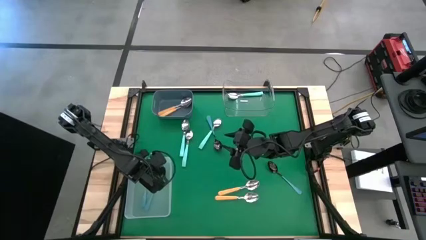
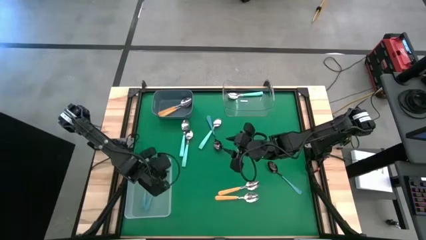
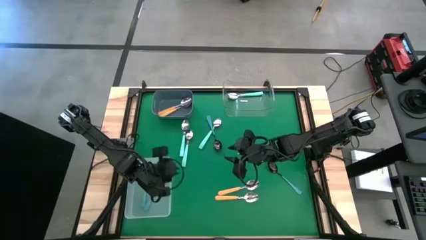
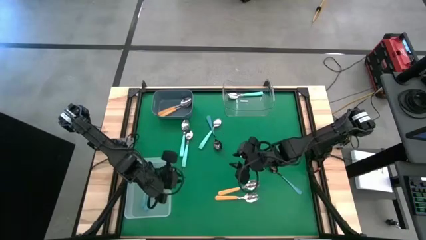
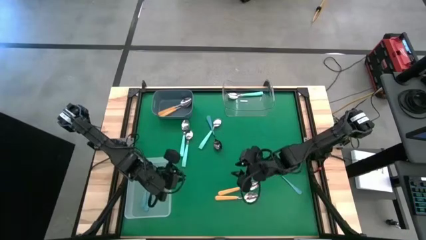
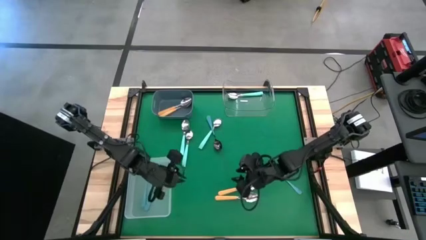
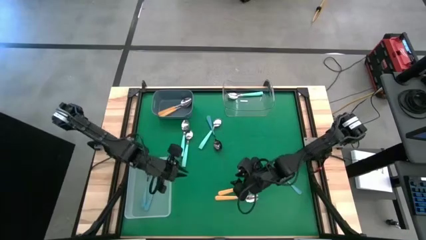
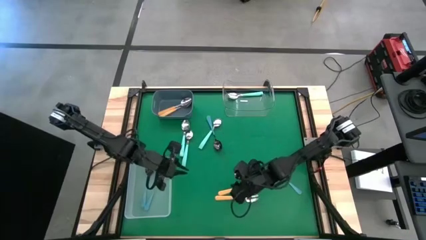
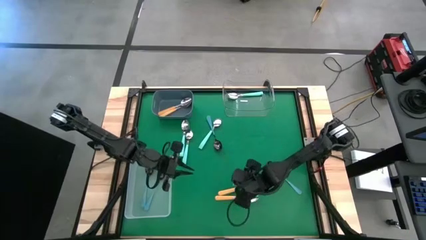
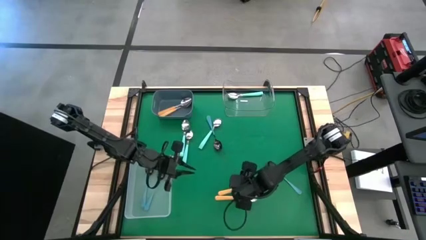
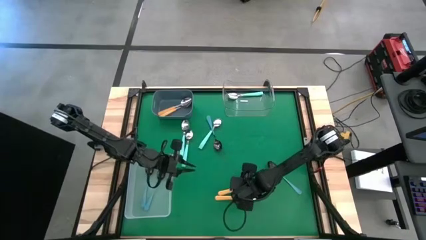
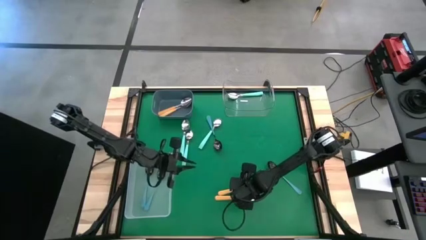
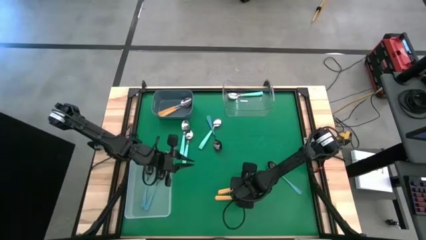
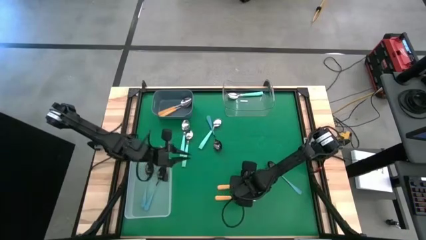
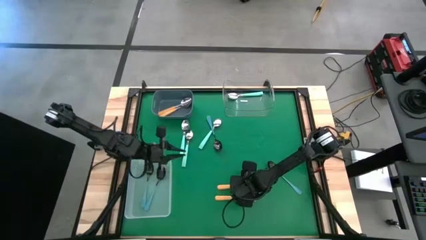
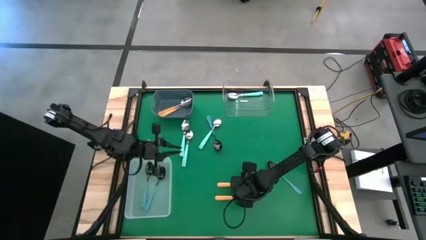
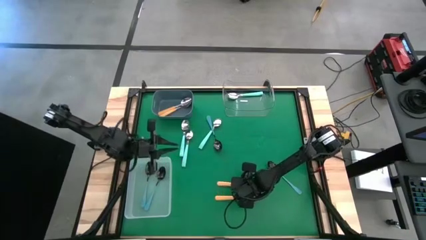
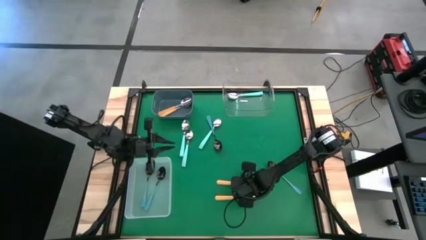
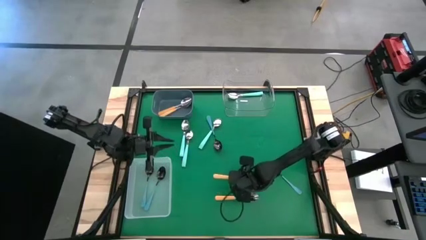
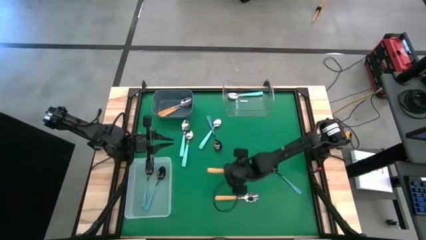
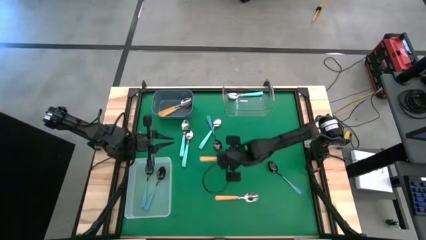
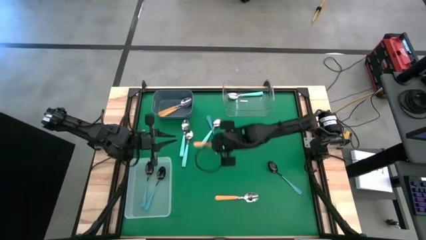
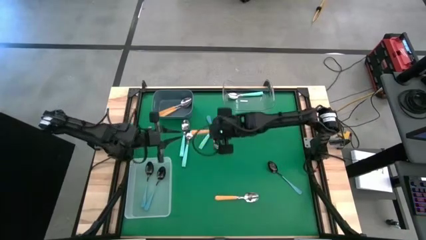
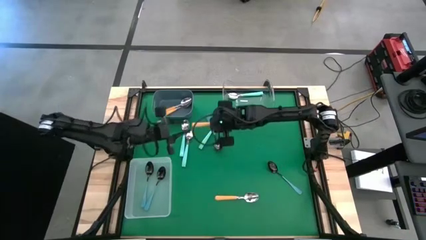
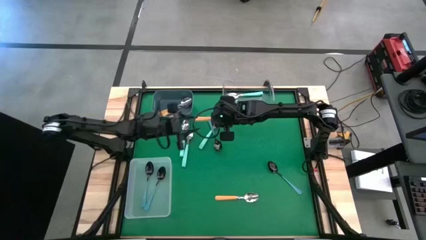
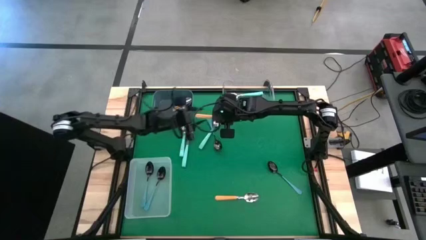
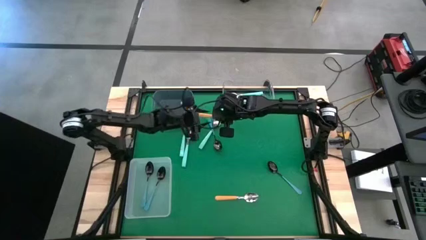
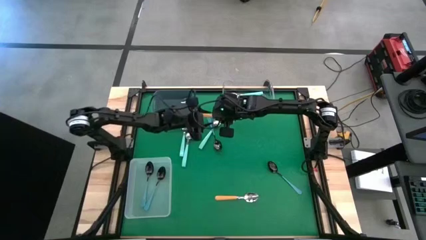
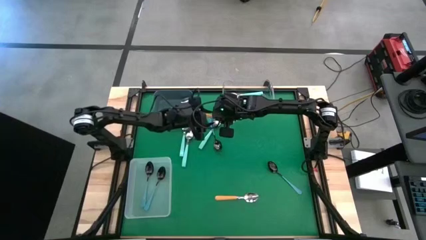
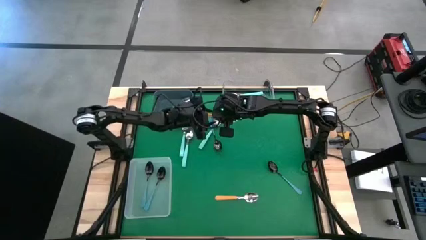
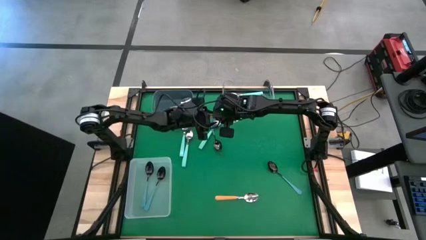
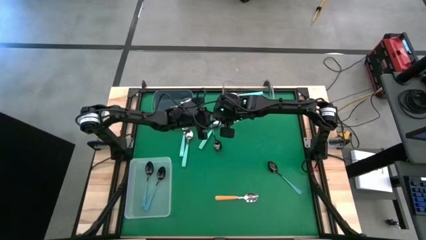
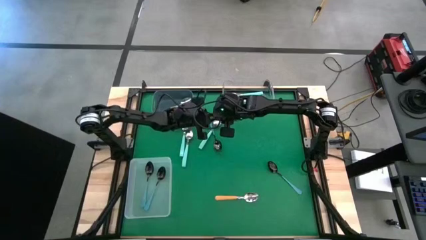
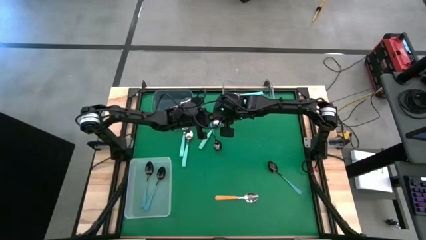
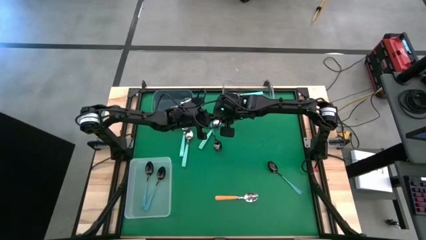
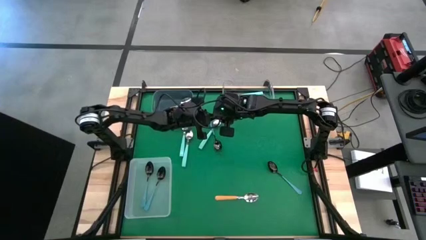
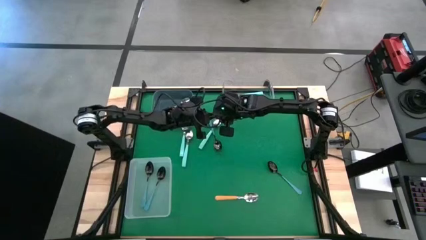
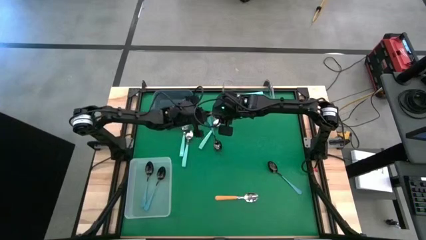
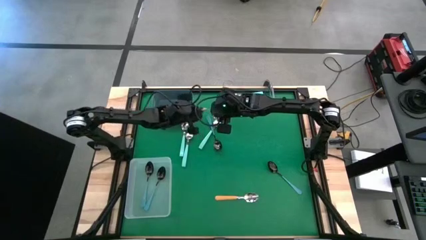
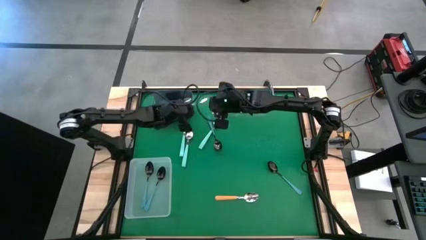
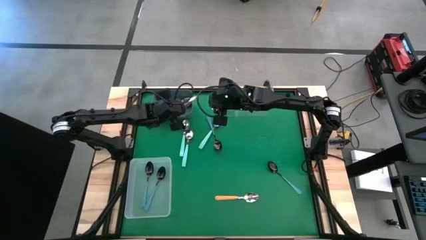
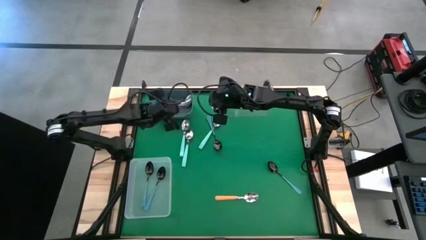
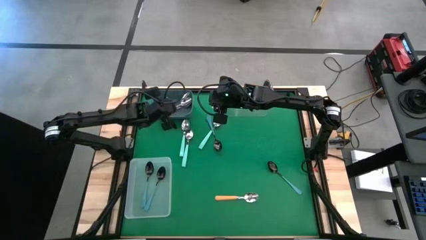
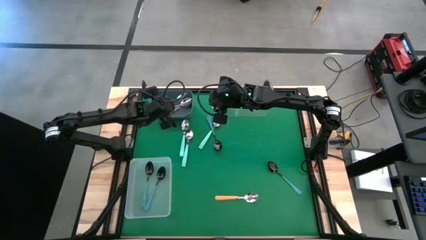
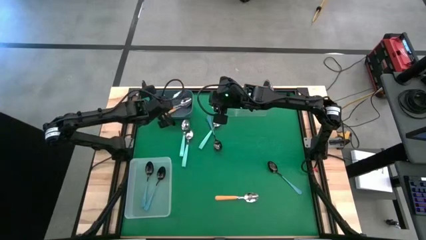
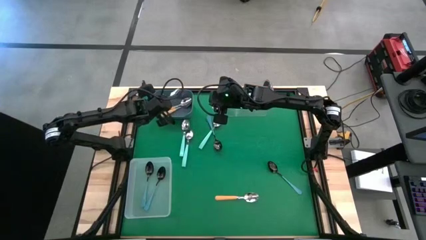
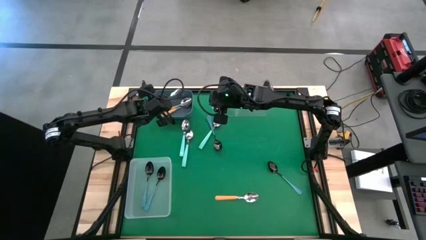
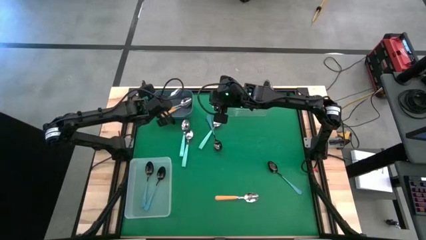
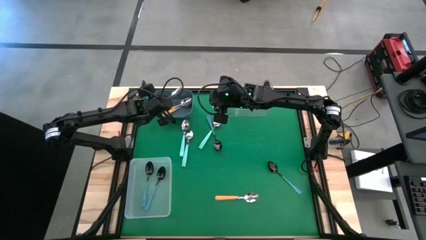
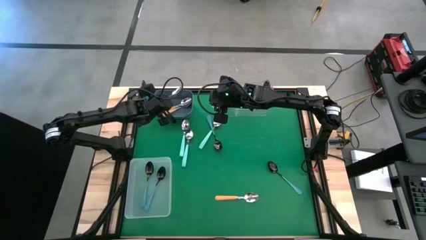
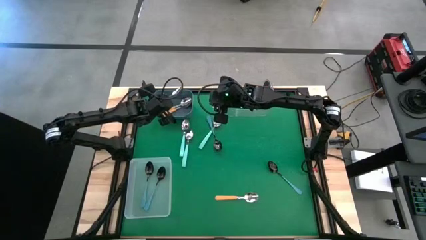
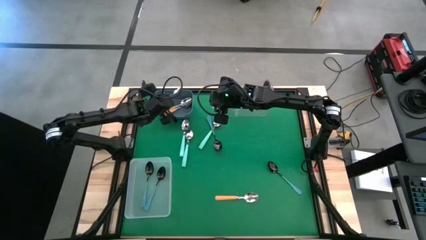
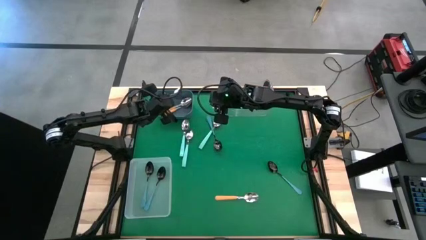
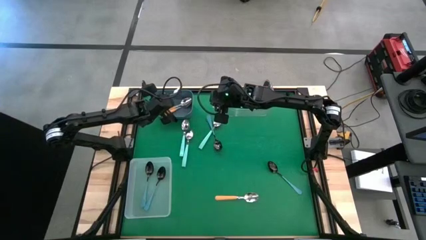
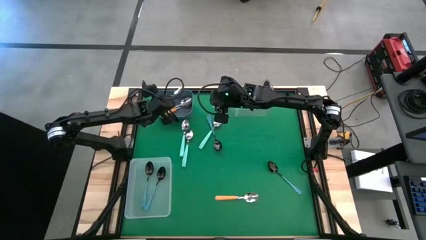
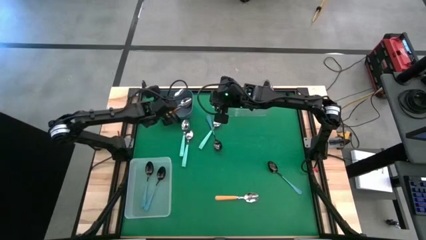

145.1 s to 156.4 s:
Task: Sort silverware by color (type)
Put the yellow spoon into the gray bin

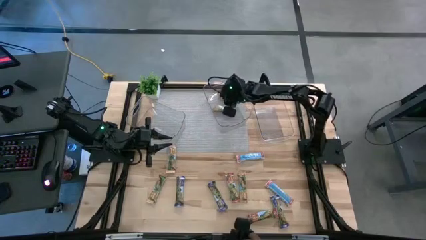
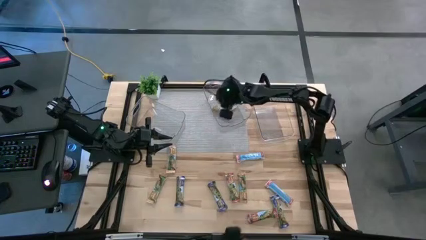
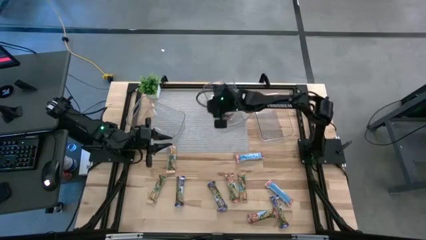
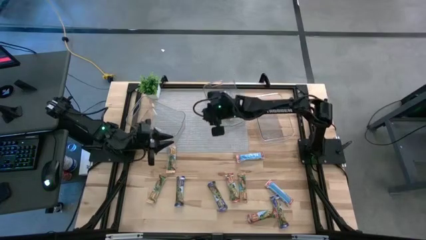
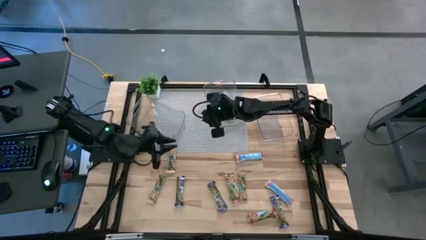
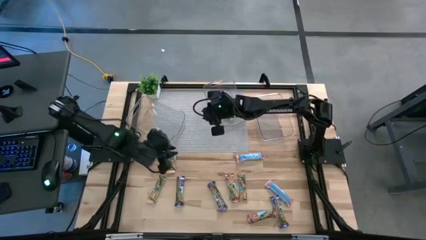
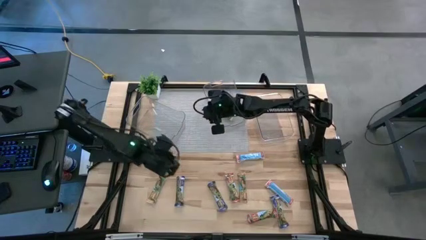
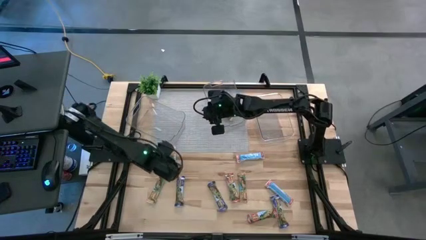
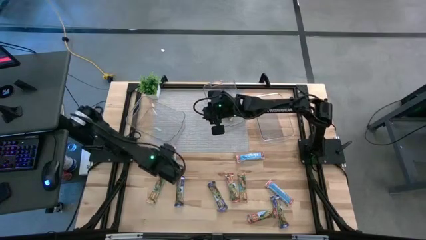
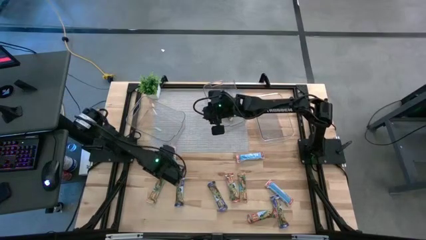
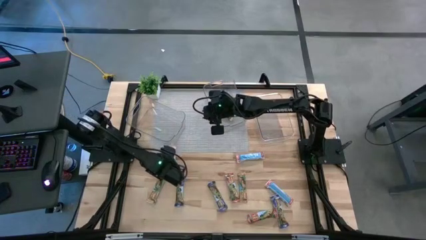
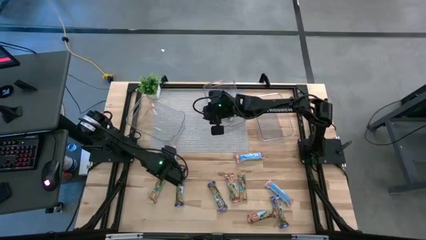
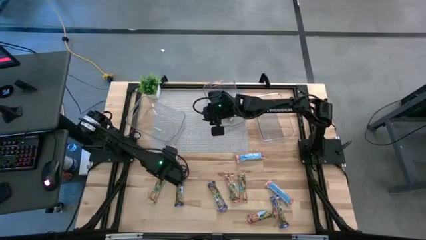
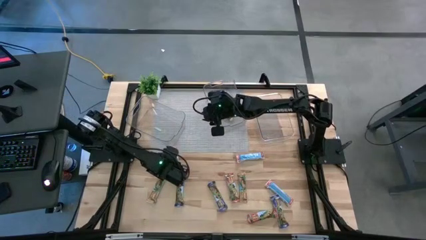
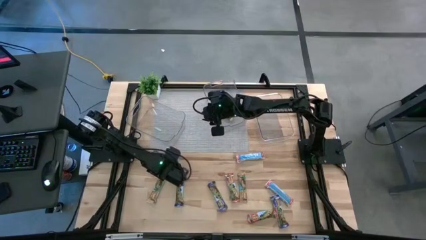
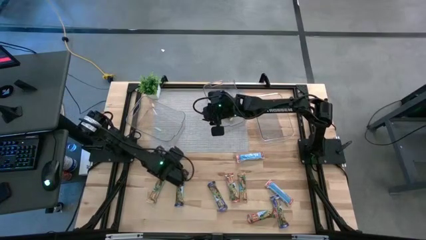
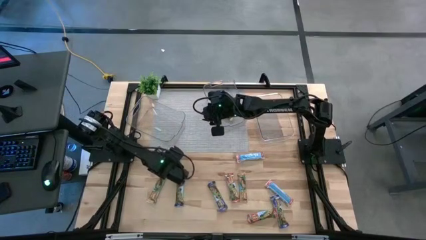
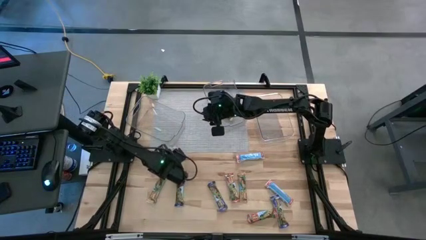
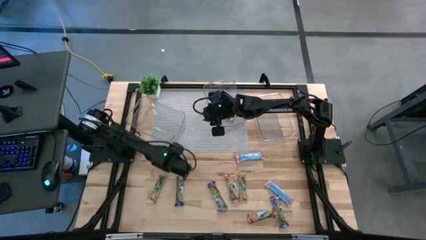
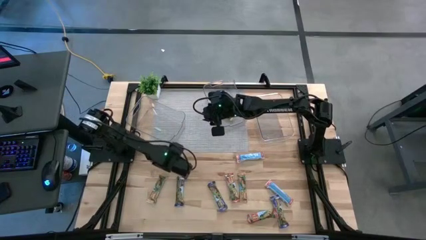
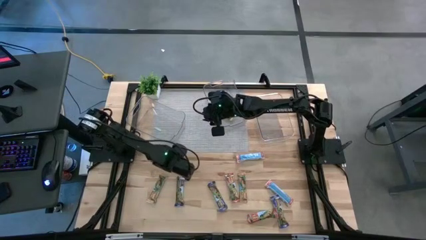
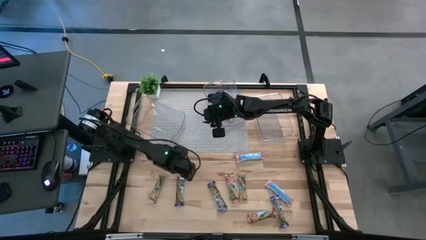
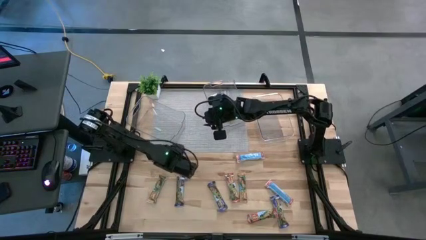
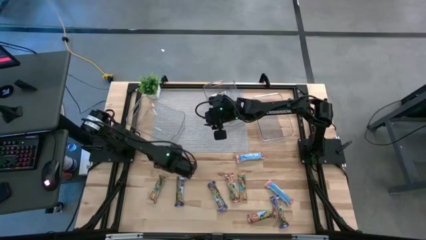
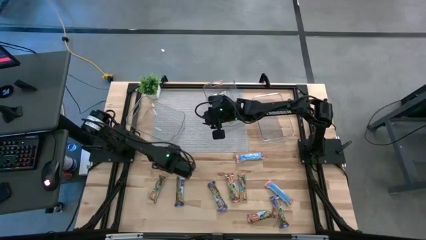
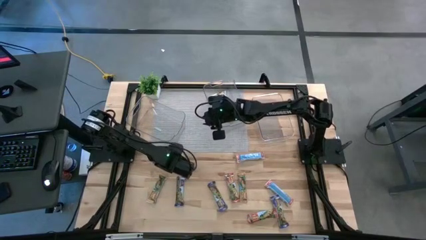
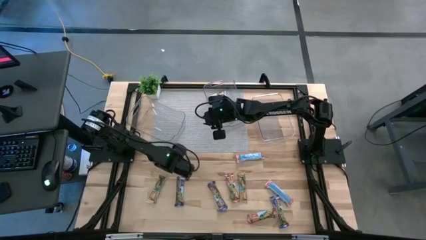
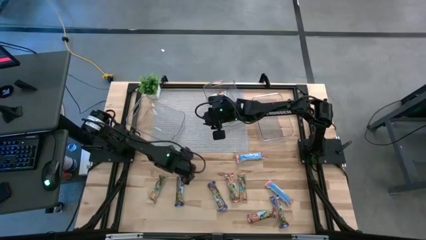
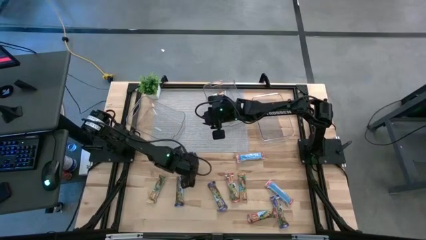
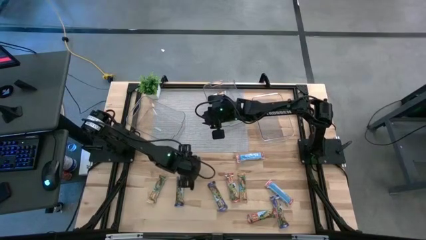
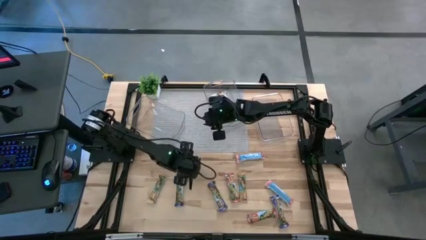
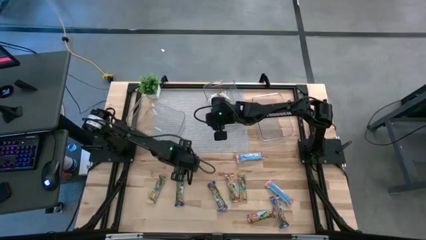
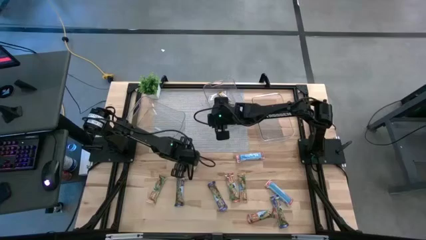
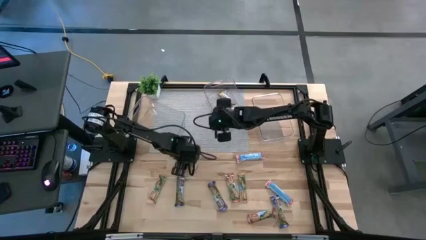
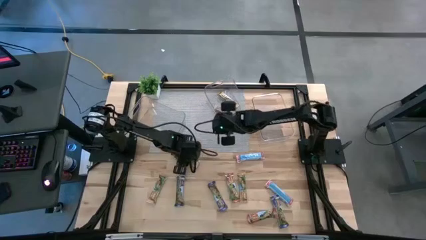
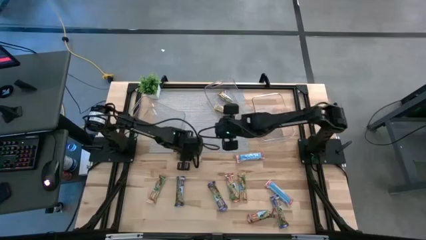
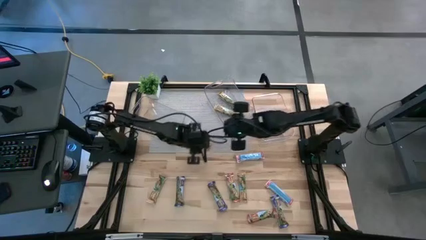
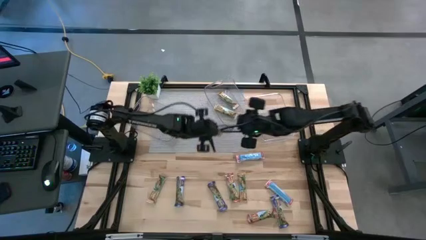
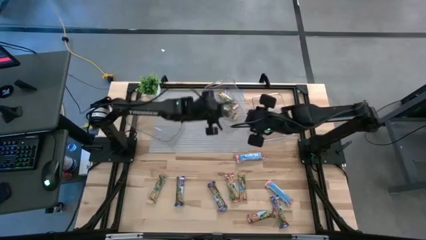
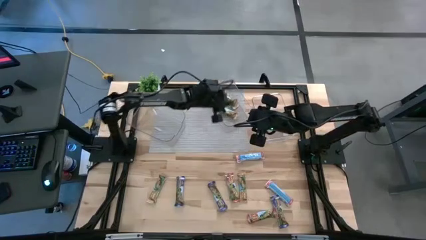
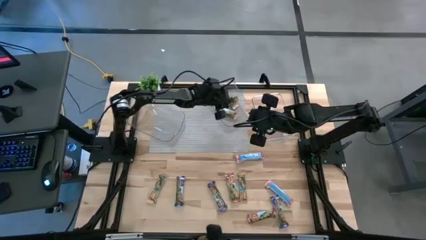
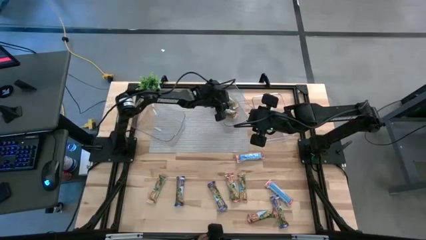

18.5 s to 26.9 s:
Task: Pick and place Granola Bars by type
Put the yellow granola bar into the middle transparent bin
